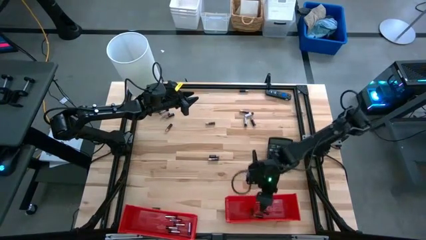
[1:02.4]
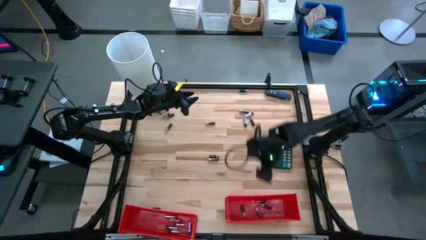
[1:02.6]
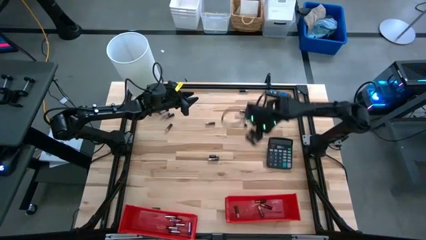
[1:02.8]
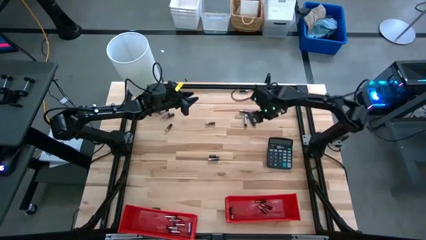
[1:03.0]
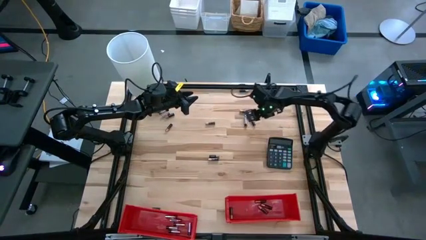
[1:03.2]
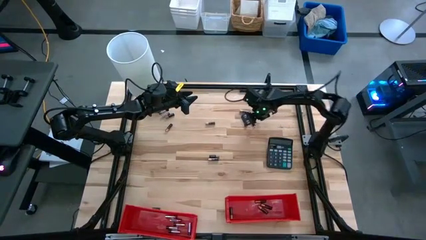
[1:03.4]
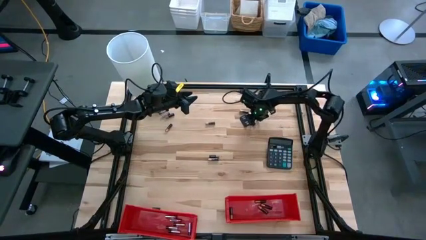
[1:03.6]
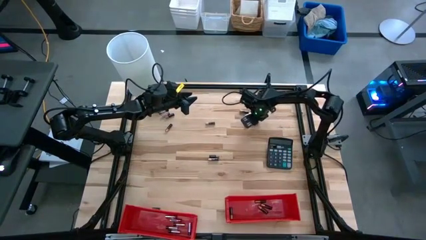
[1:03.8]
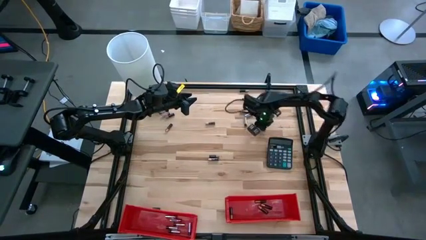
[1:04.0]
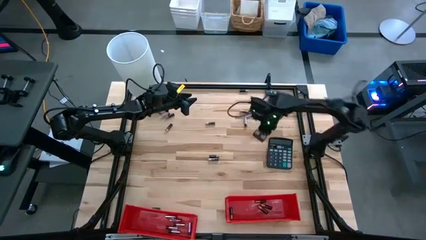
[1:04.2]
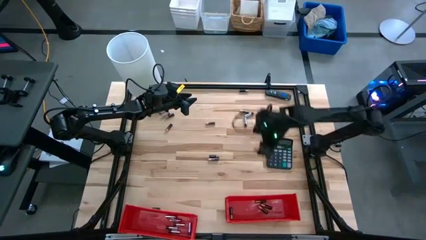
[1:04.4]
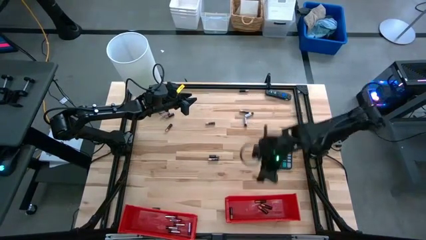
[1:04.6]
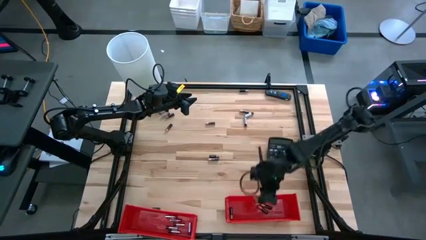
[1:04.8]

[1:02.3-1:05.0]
Task: Sort batteries
Put the black-brown battery into the right red bin

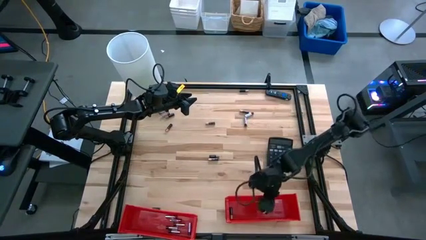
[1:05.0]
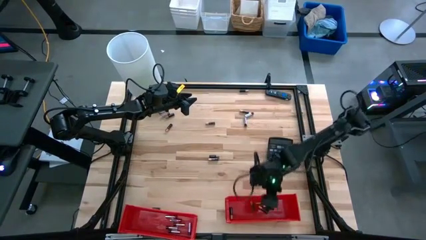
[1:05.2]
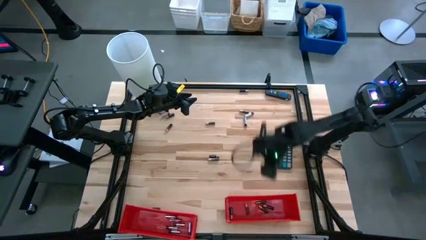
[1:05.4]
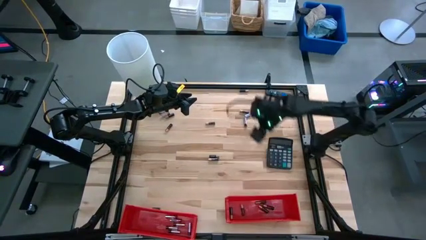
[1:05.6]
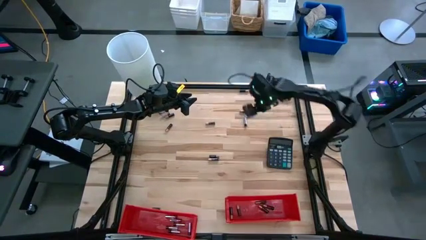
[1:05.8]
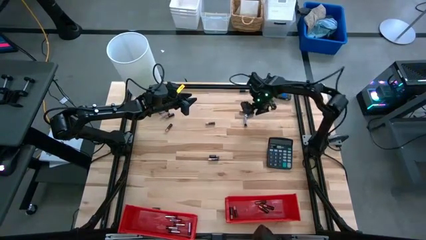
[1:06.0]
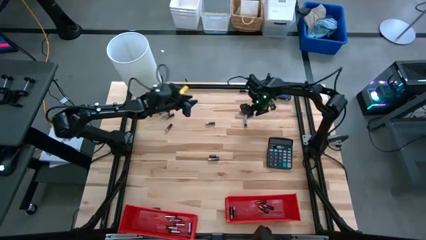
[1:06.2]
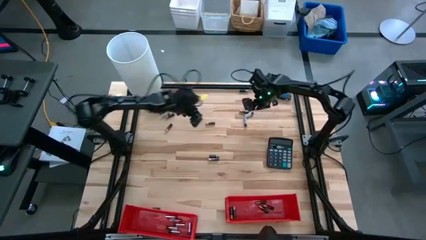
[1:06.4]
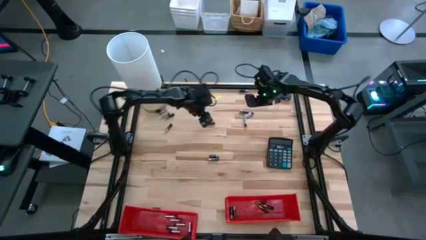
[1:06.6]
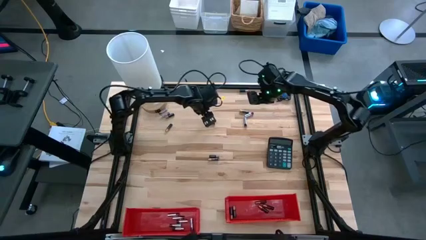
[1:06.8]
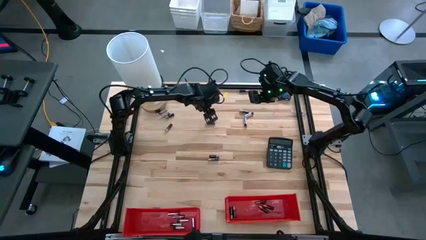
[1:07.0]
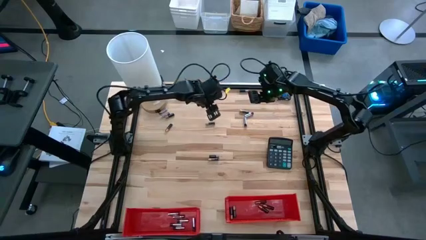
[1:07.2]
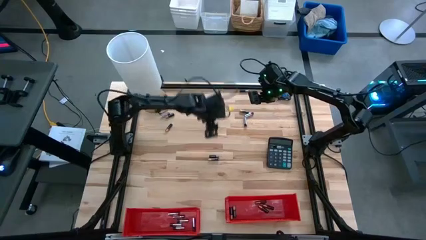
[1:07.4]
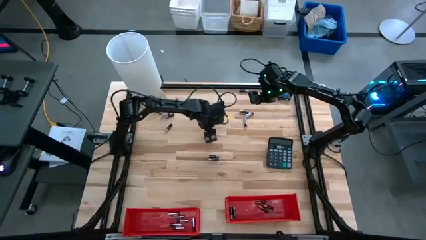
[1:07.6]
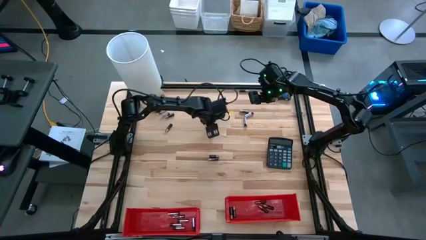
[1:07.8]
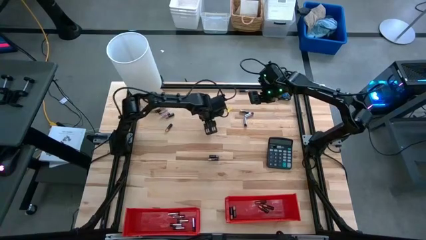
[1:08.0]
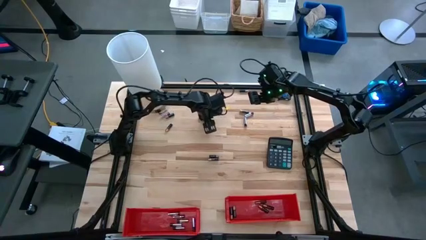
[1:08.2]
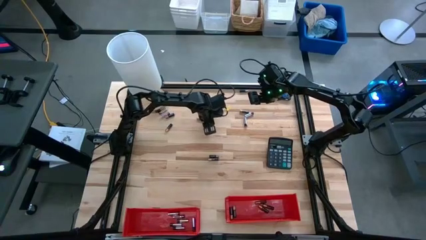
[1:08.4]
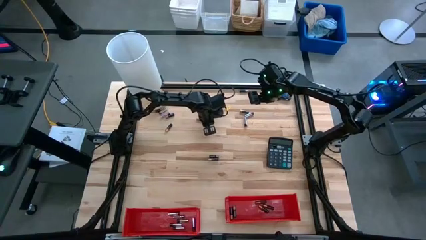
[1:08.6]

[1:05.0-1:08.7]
Put the black-brown battery into the right red bin

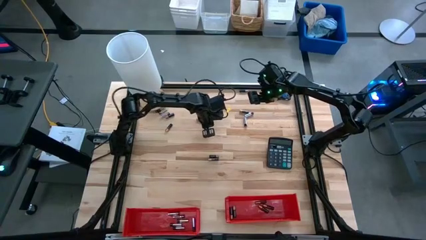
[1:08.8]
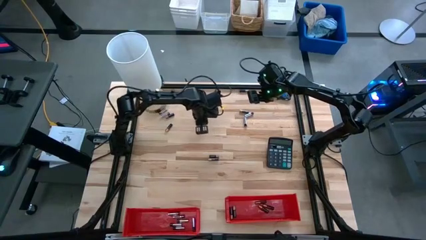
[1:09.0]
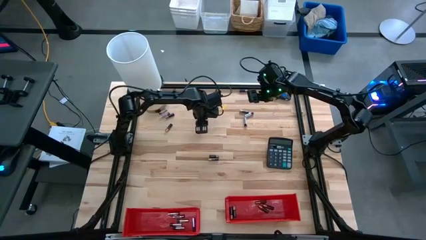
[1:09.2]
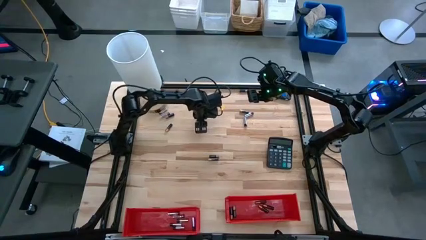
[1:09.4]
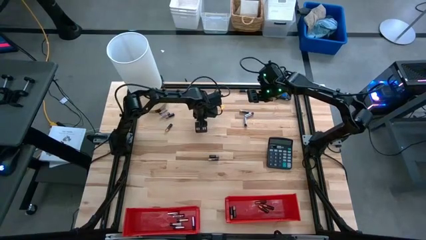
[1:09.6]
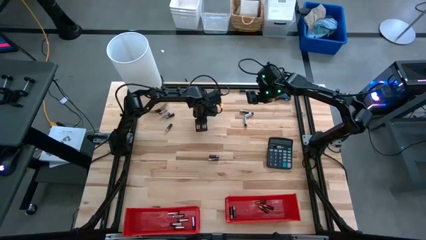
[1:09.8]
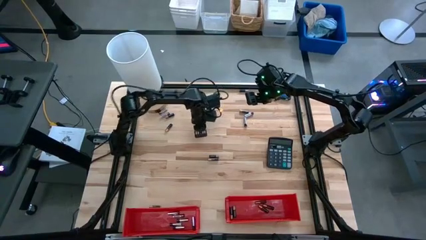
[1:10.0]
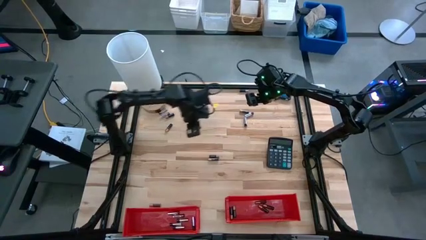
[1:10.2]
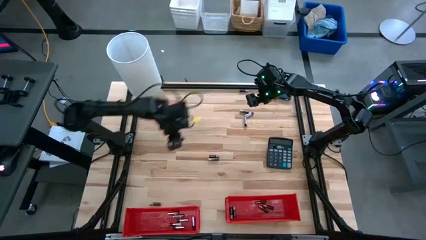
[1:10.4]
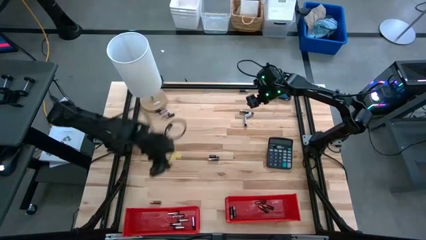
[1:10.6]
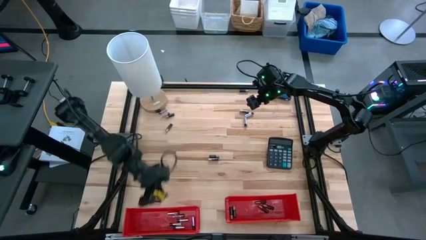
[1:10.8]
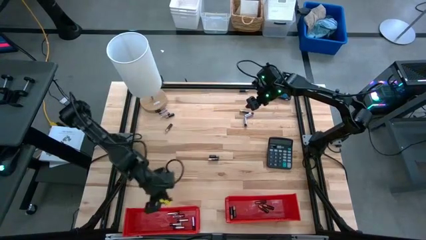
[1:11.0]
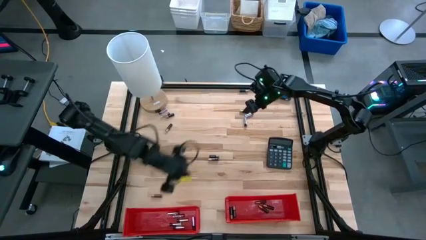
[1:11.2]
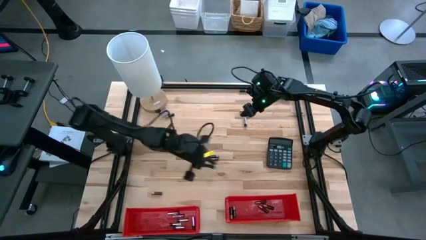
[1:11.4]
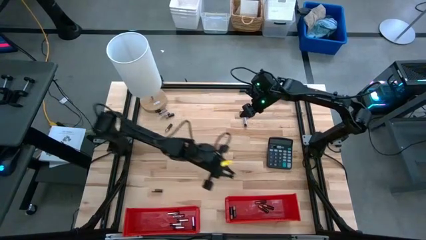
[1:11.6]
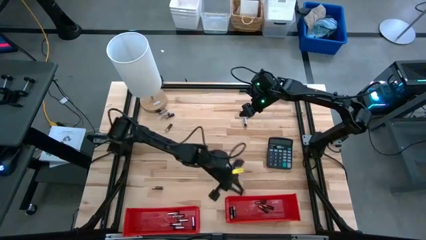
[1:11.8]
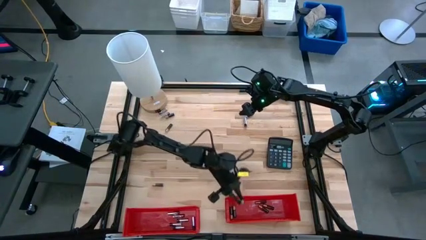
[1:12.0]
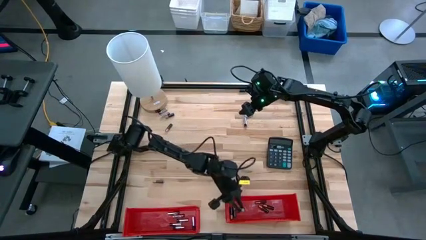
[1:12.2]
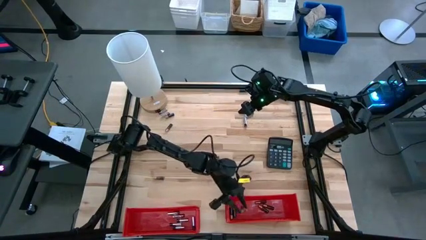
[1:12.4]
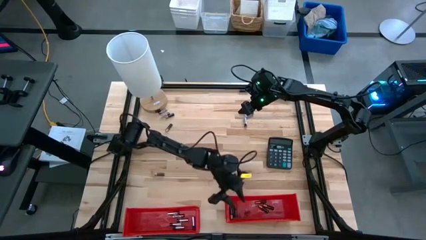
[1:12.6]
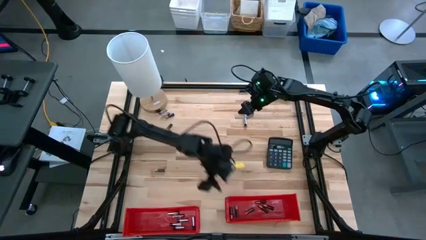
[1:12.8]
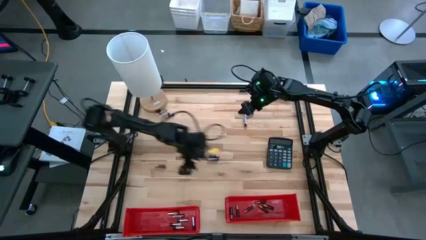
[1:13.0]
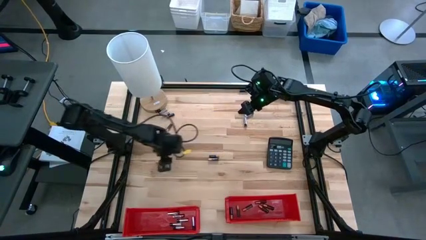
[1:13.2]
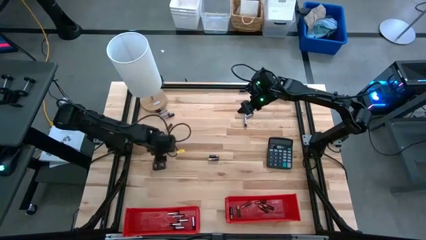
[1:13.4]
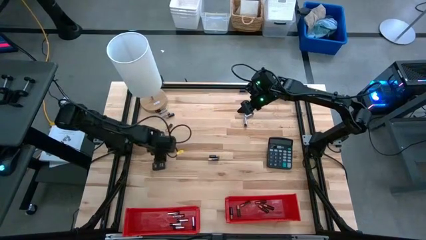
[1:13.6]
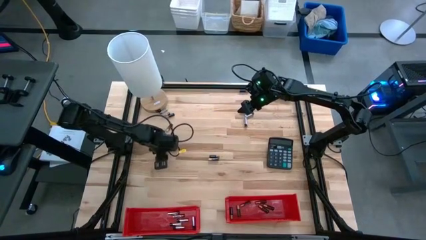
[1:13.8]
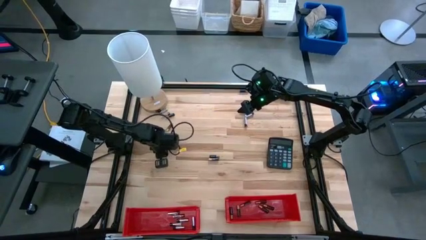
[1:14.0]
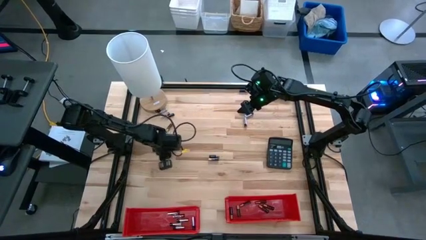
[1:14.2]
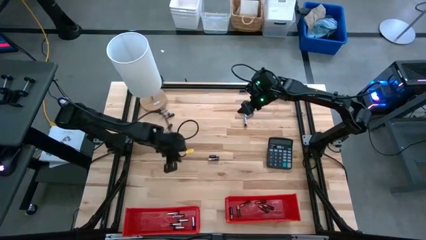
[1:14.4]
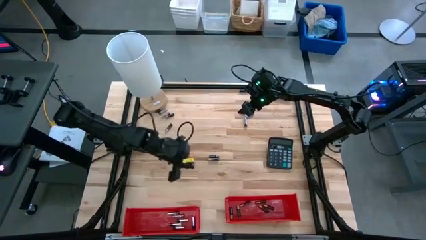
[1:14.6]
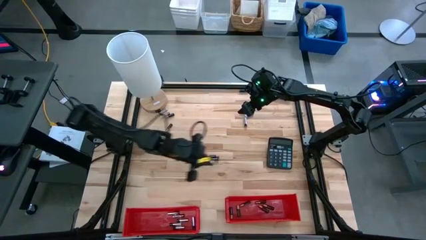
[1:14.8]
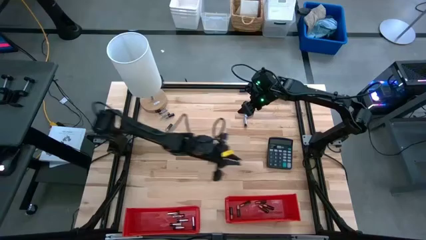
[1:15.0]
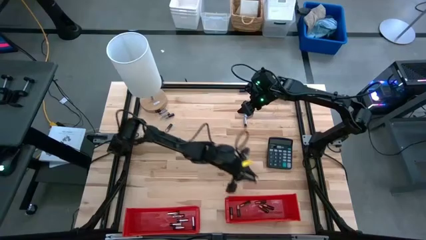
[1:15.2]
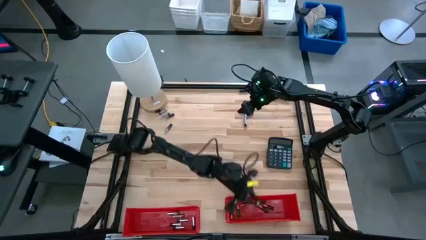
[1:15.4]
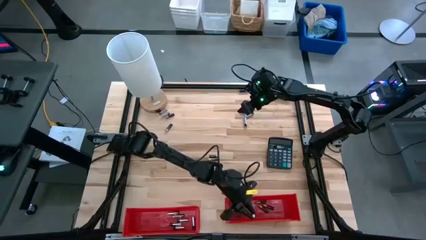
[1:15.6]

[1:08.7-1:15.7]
Put the black-brown battery into the right red bin

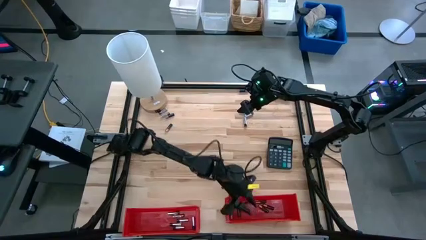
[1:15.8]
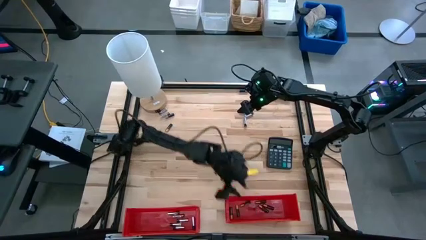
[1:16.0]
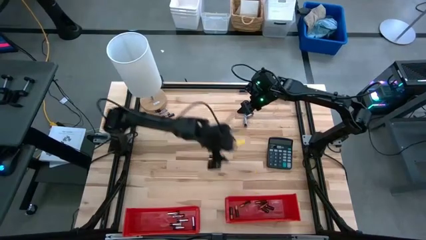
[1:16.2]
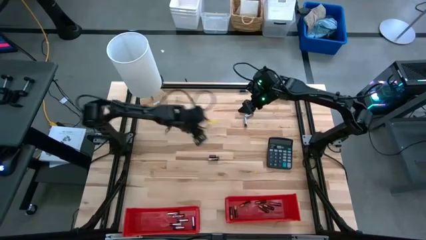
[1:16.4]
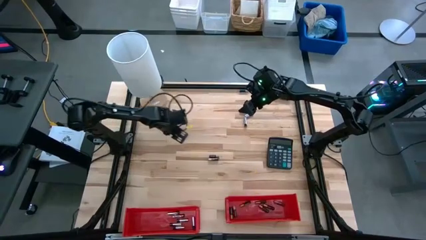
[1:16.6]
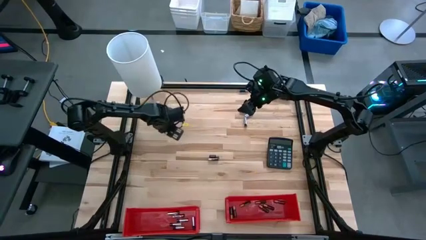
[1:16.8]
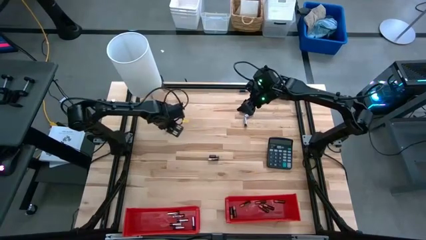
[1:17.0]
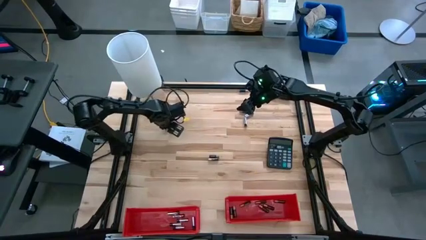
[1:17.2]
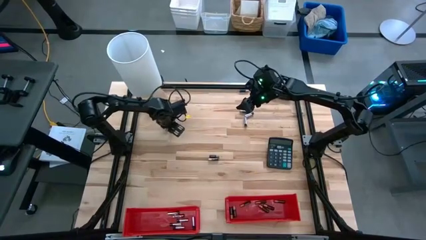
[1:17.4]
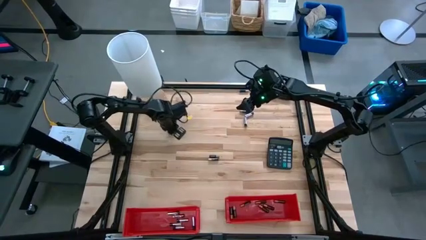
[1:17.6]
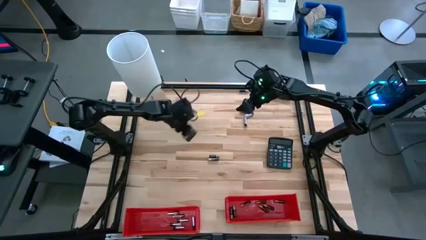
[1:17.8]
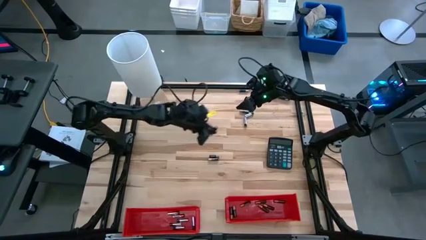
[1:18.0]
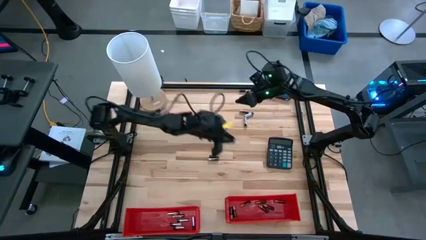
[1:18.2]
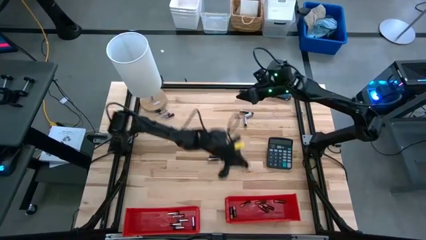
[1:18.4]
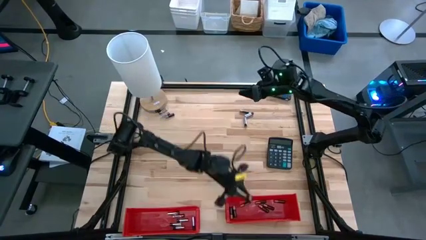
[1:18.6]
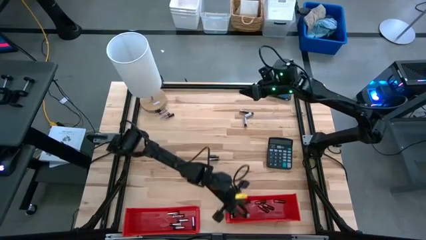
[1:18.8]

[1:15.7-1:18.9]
Put the black-brown battery into the right red bin
